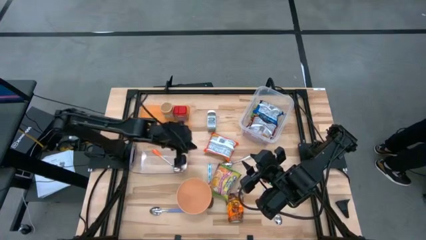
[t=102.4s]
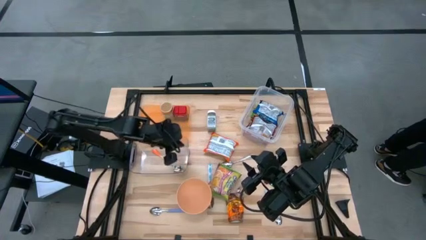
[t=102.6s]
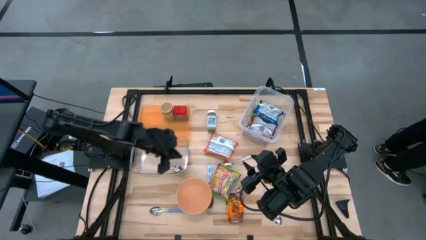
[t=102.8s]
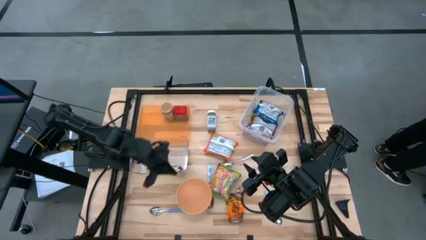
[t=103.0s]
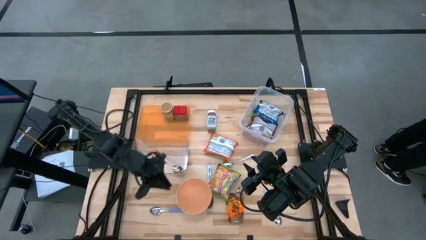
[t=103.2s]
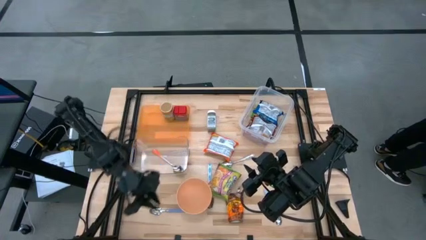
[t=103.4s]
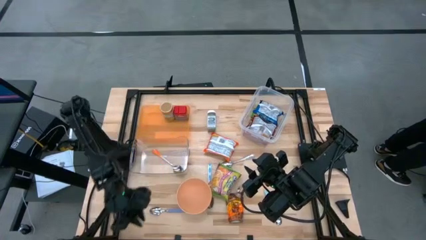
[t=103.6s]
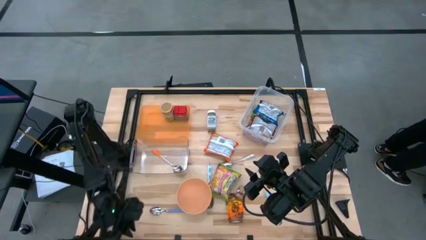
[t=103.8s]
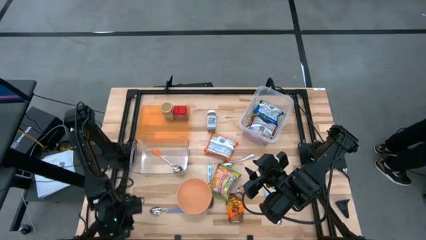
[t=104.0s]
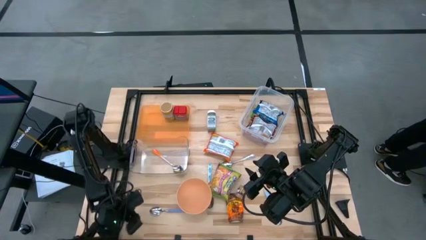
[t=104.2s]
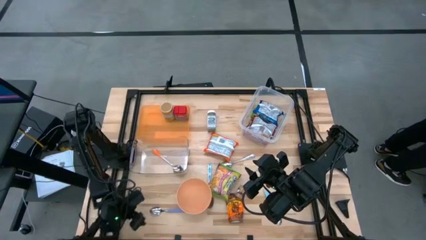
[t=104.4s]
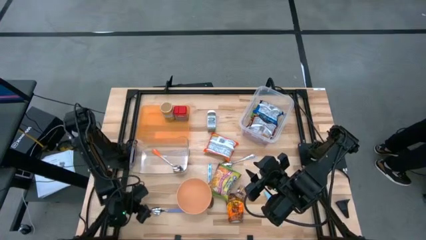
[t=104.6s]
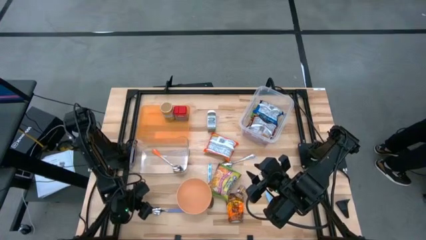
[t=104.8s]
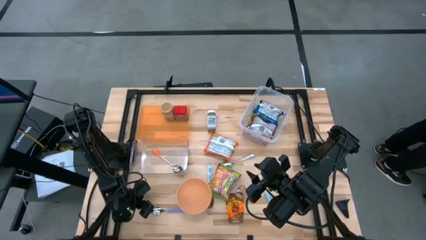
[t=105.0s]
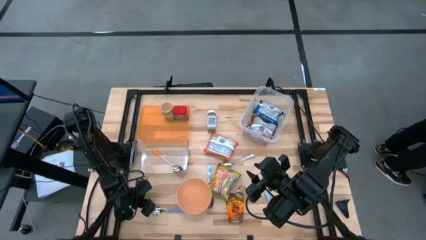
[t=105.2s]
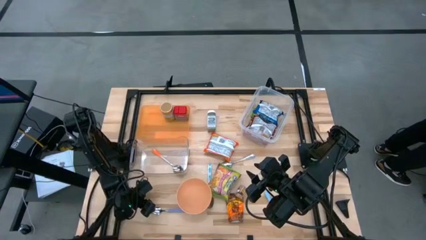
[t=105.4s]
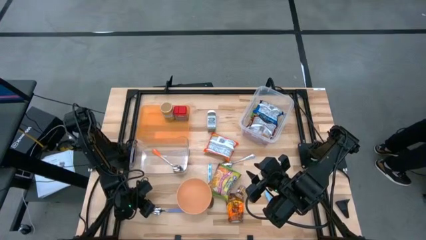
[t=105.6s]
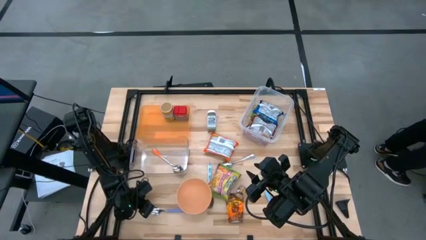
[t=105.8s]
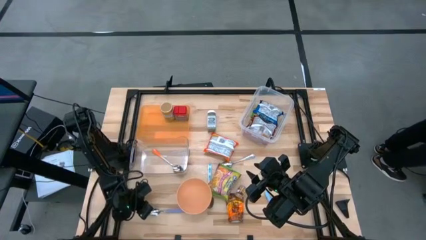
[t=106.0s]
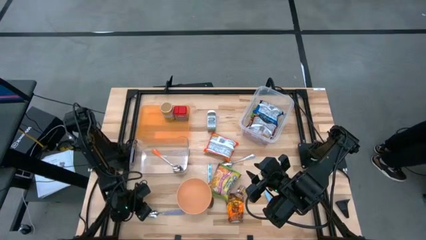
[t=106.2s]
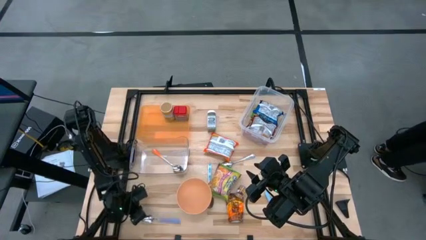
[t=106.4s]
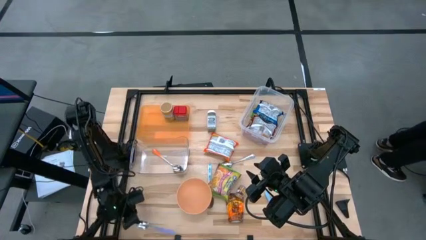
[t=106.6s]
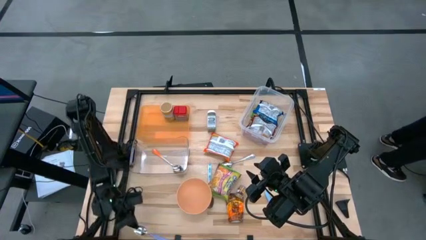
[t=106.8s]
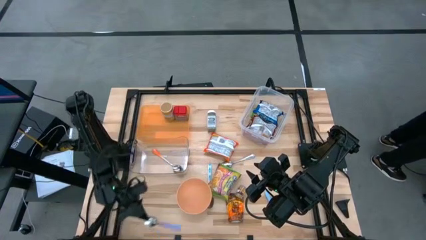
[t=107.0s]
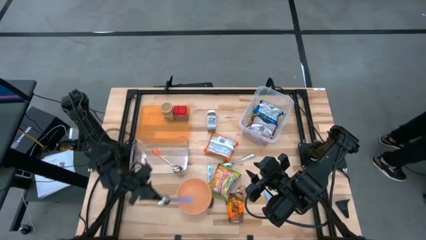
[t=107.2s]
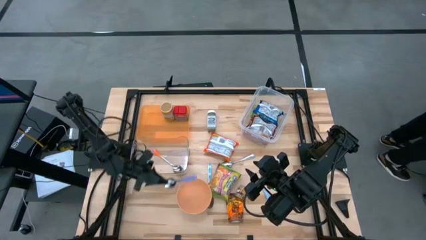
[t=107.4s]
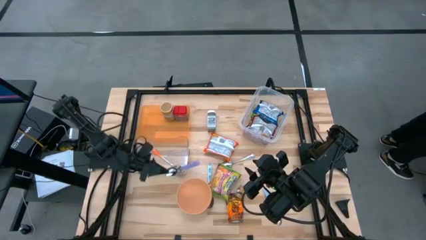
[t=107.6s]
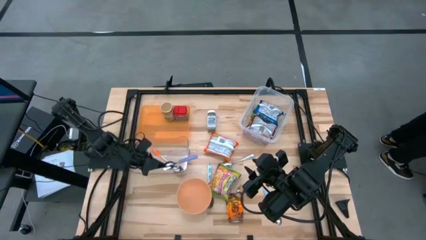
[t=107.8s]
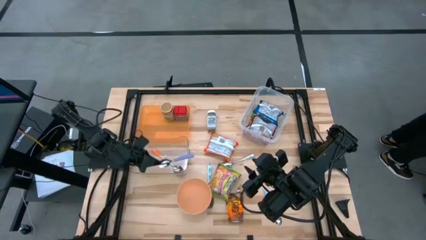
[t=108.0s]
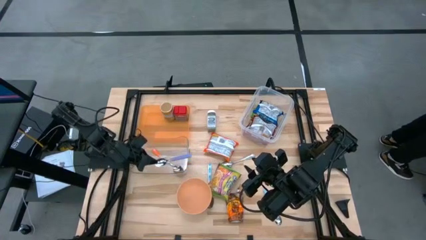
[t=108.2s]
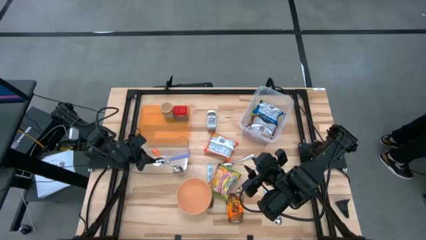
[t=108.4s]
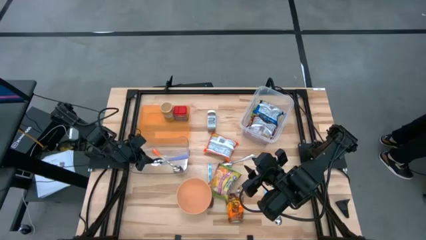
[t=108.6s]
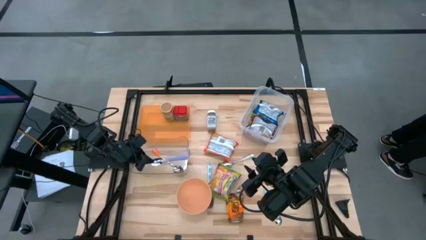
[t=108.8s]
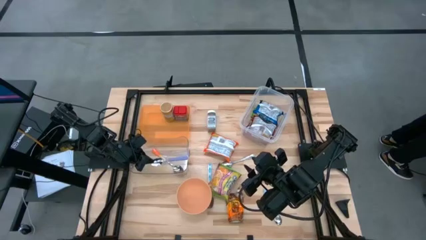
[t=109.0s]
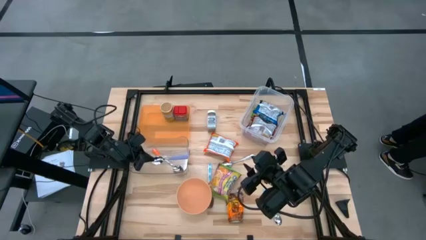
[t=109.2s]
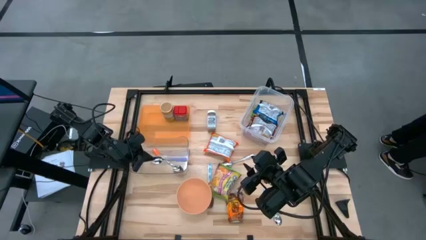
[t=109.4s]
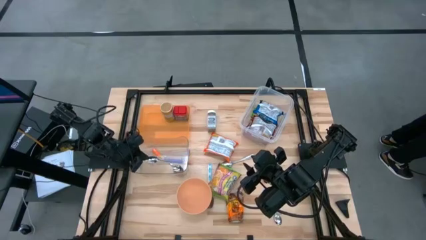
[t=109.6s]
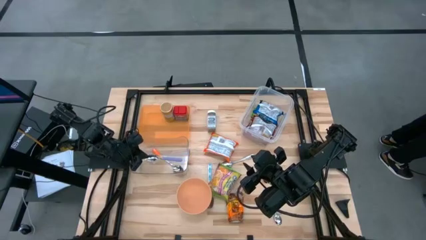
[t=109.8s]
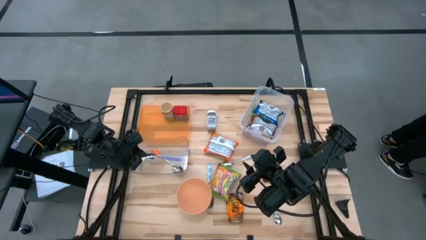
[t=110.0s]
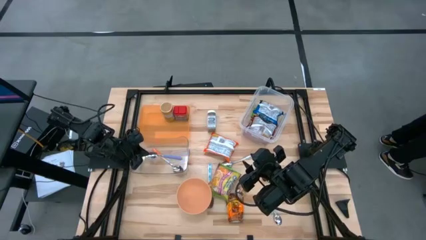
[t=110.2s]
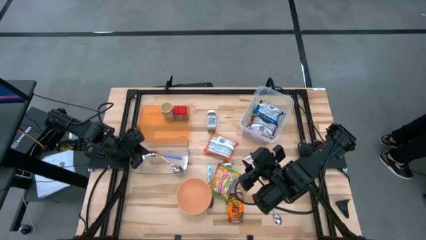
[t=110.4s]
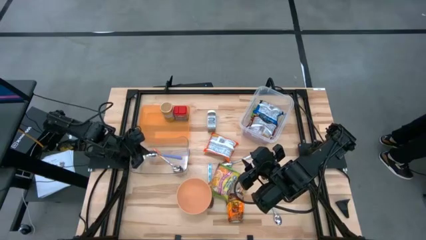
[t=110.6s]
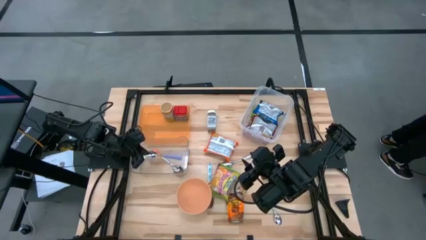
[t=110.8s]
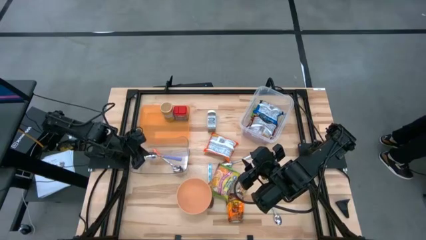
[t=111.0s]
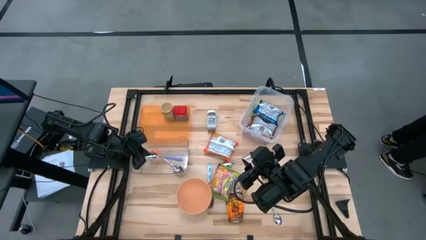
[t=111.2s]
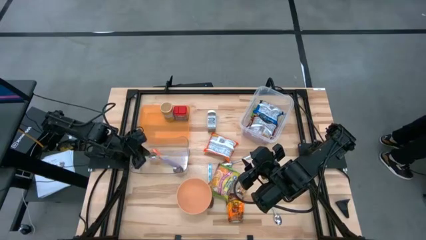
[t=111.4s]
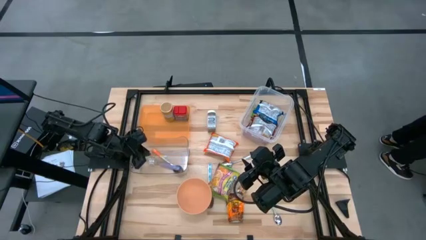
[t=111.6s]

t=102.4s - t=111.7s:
Task: Pick & Place Food Item
Put the purple spoon into the bottom transparent bin
